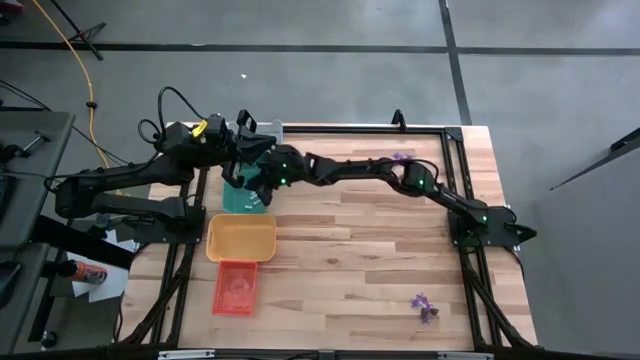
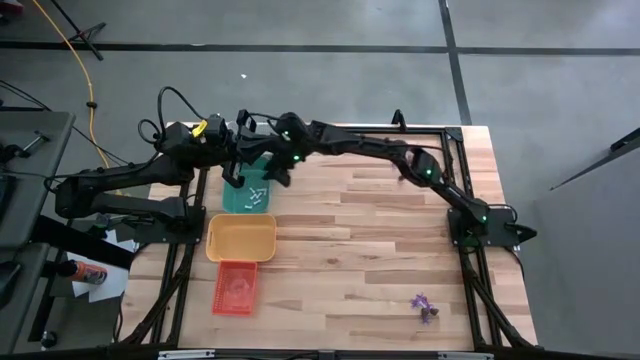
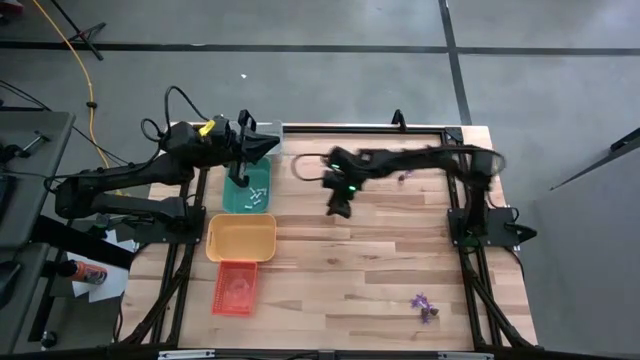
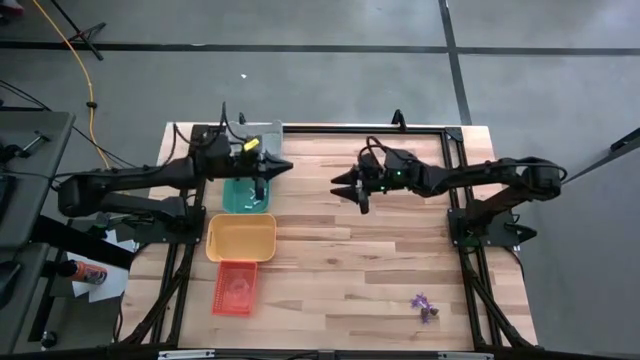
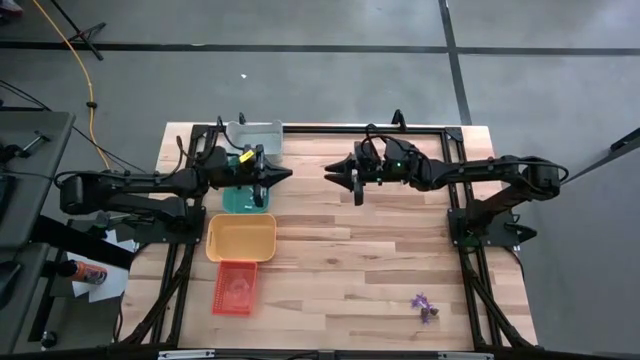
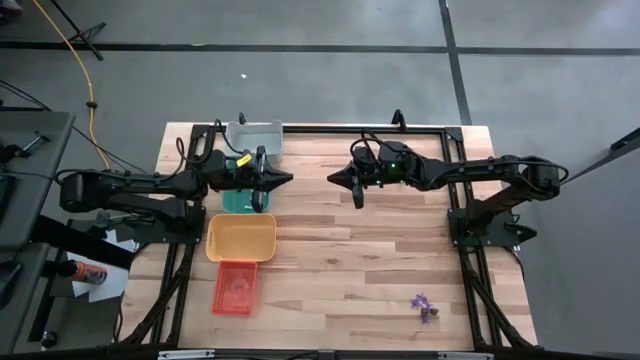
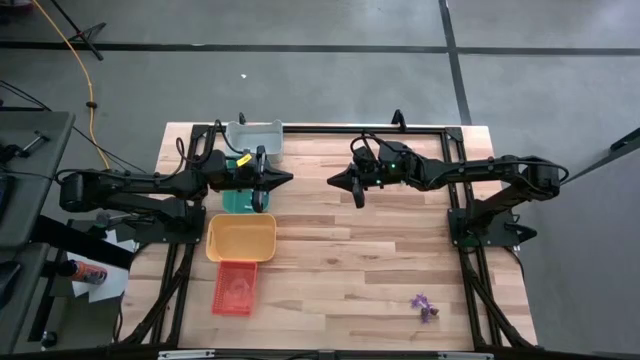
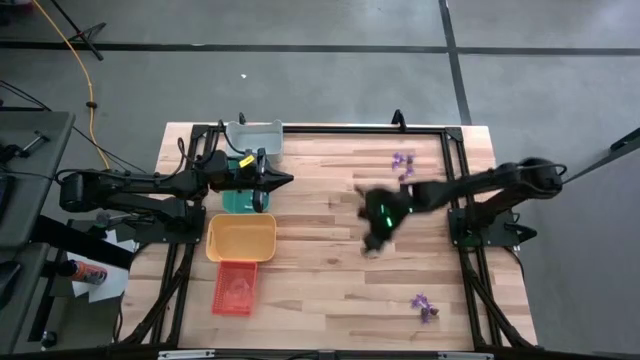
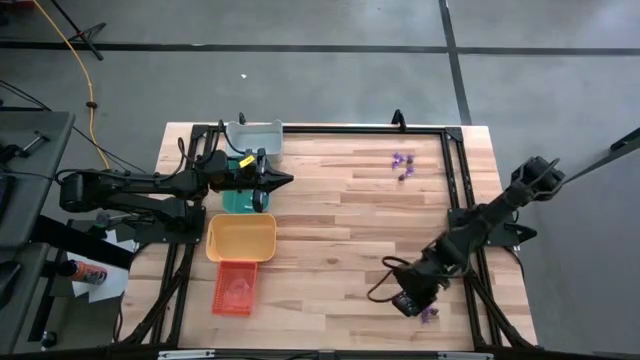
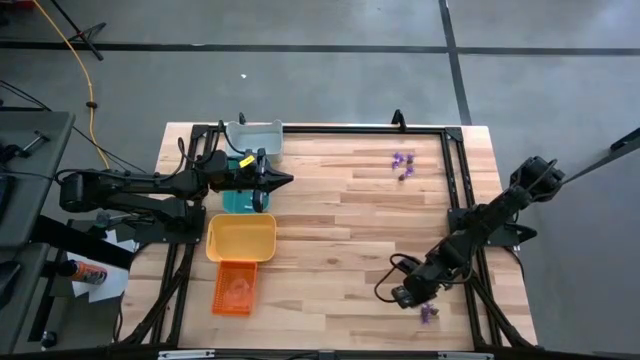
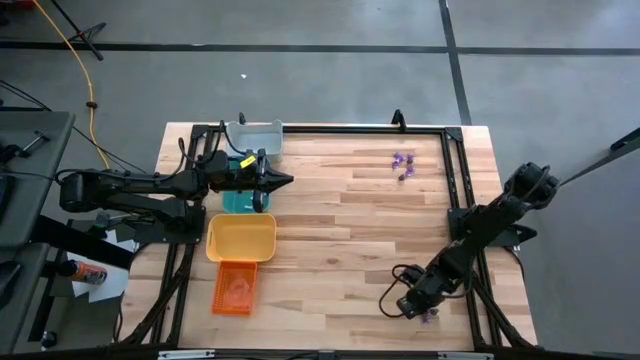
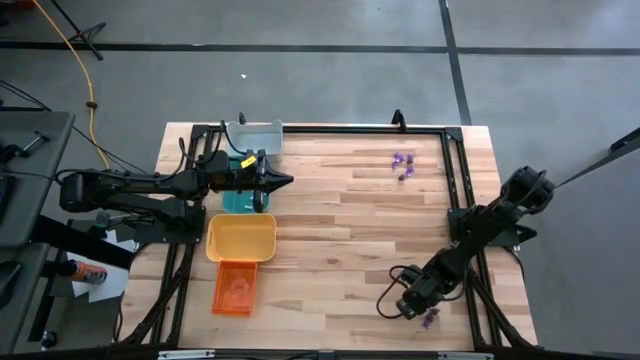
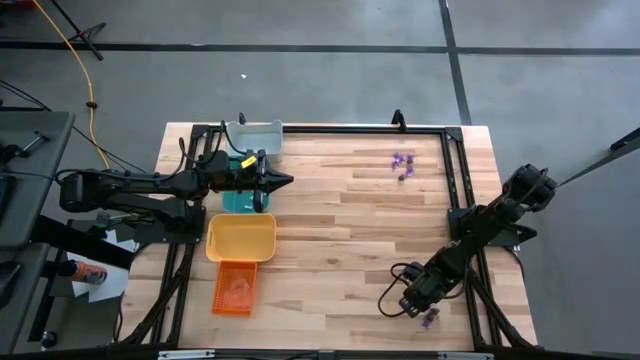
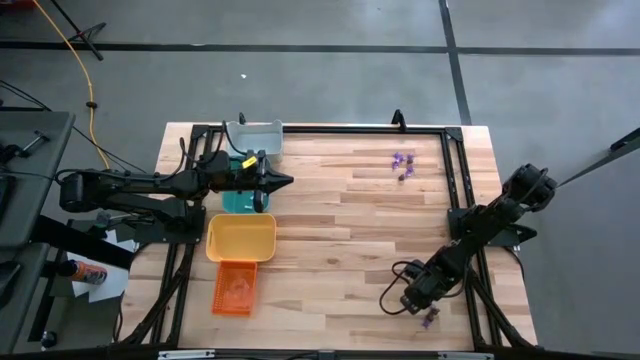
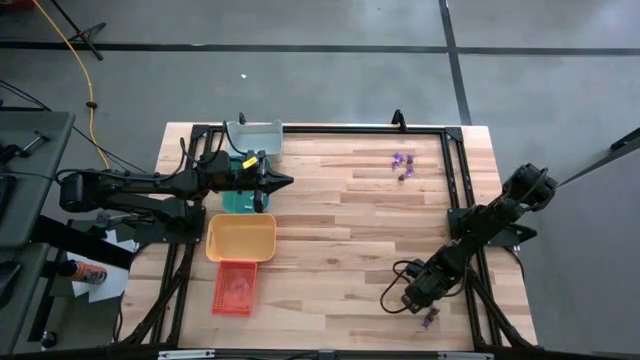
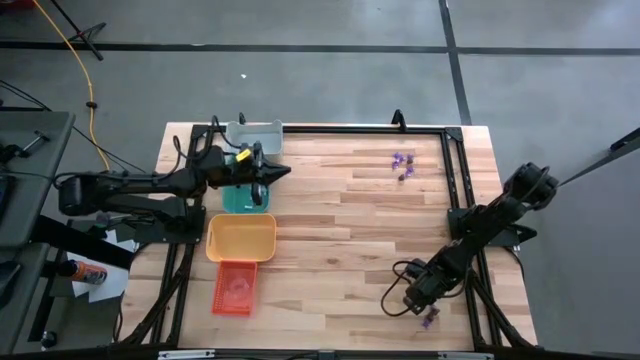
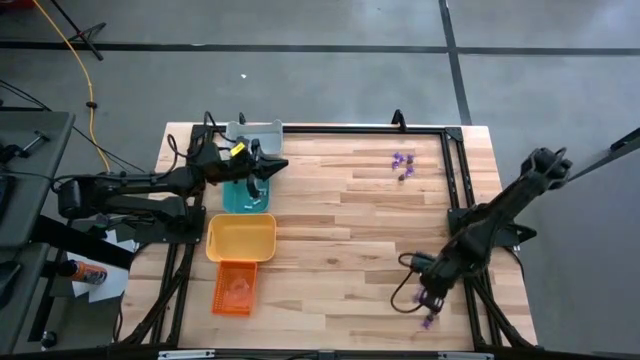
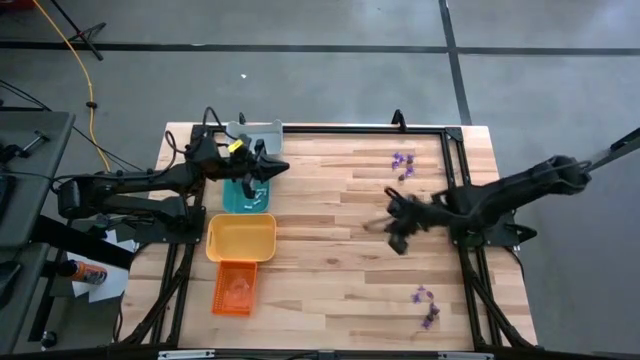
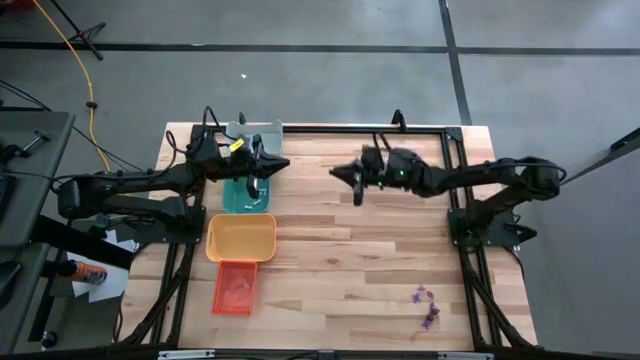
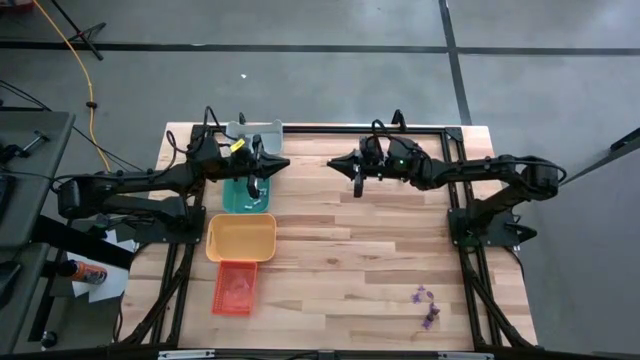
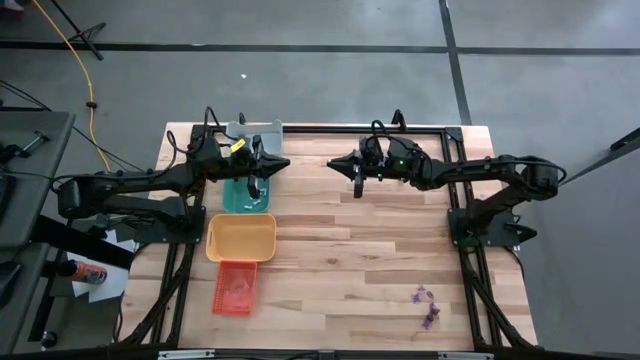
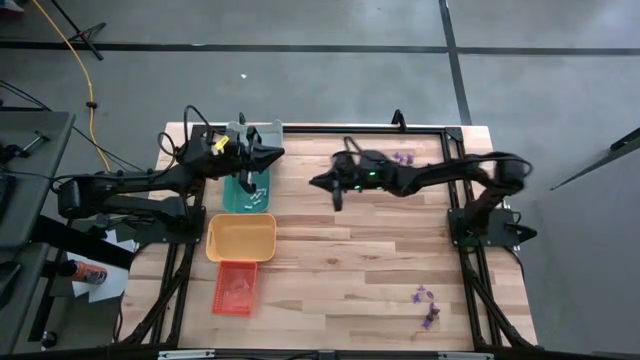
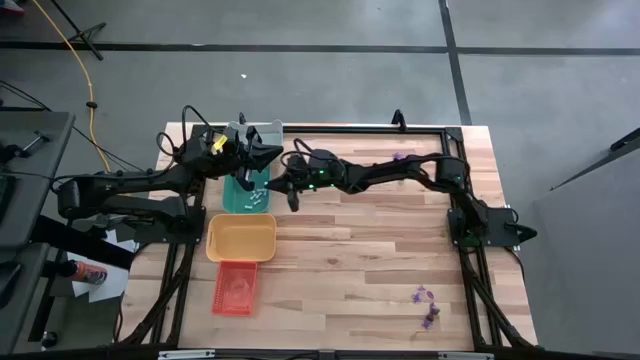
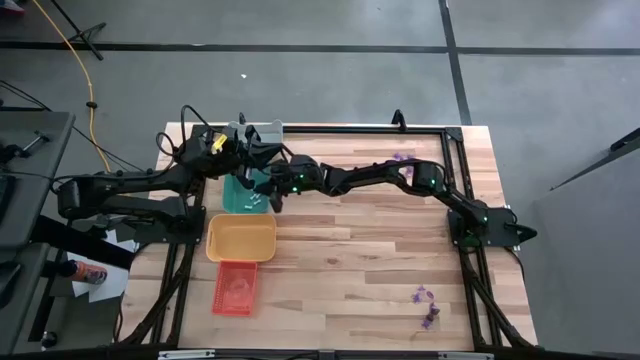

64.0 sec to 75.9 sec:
Task: Sort Halloween decoration
Put the white bone toy in the green bin

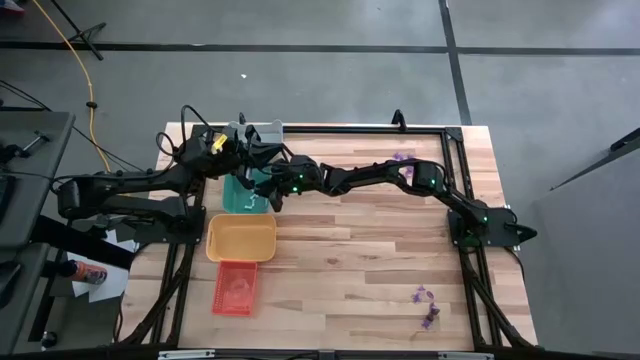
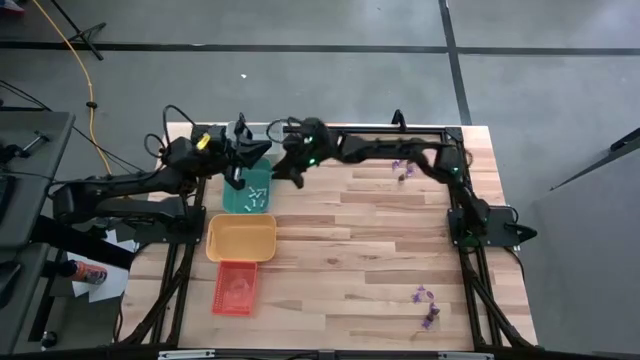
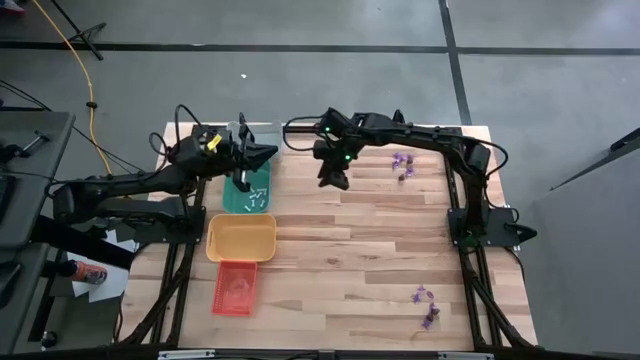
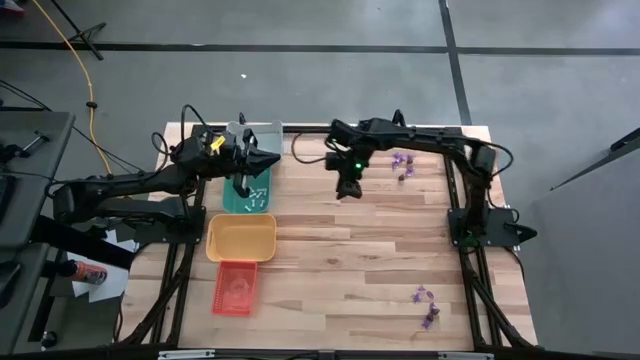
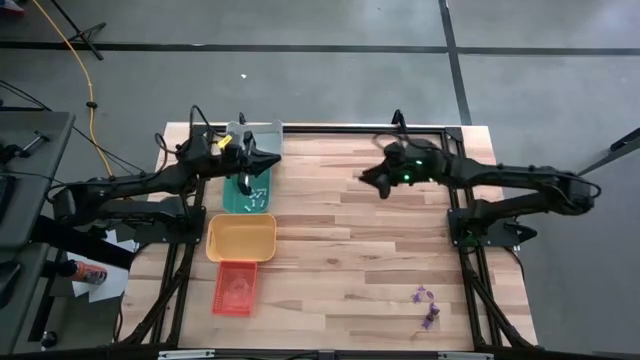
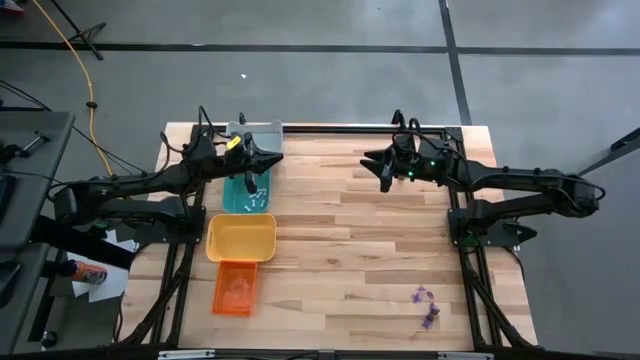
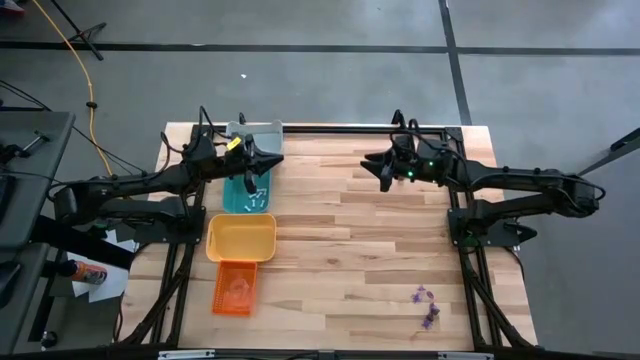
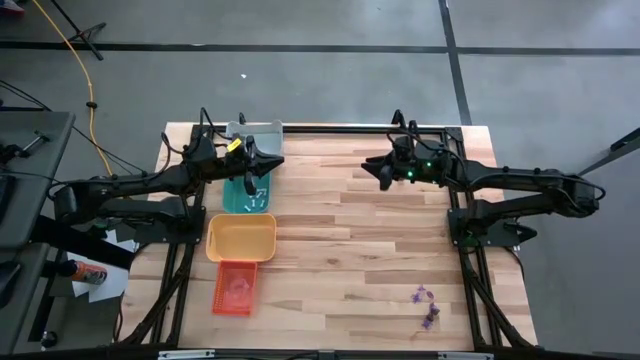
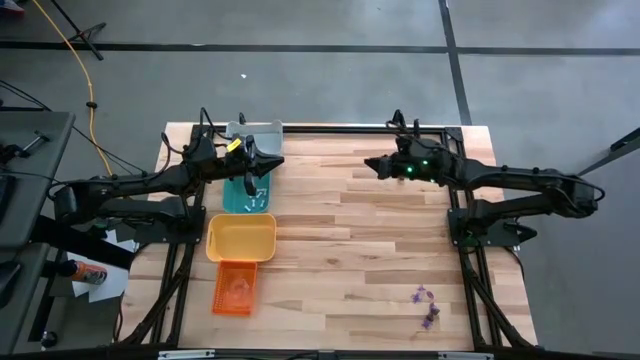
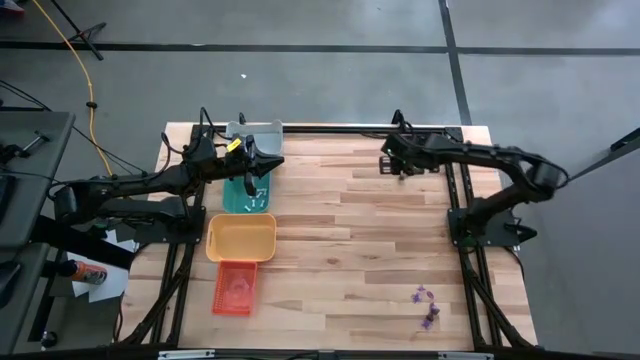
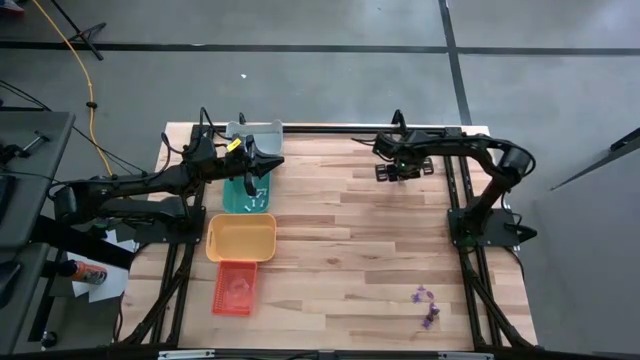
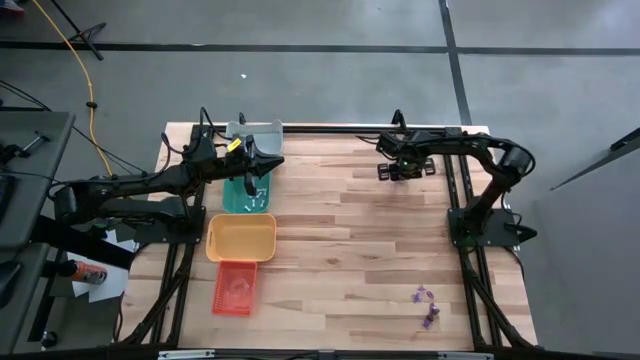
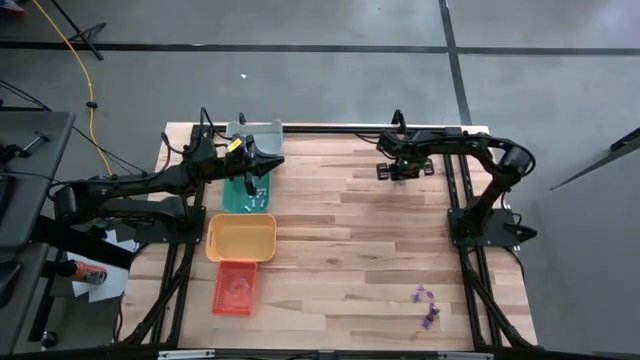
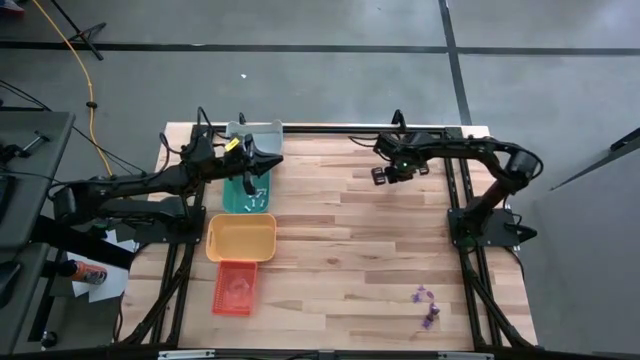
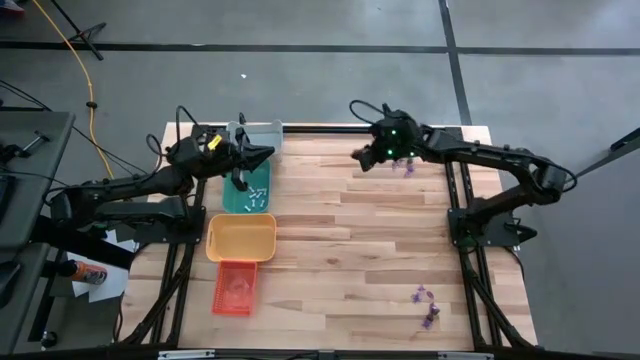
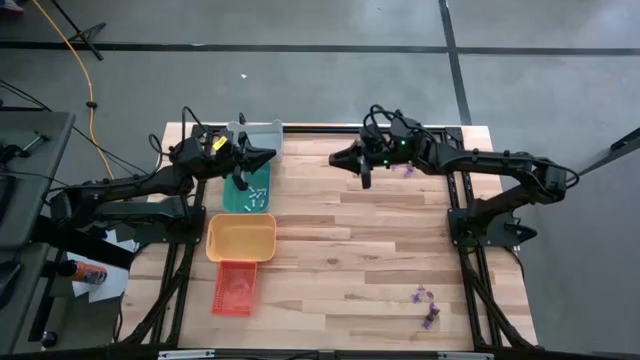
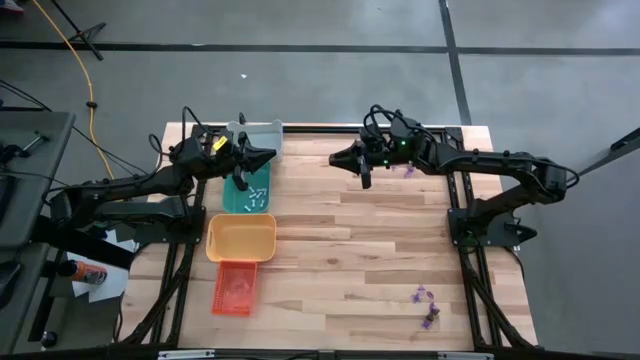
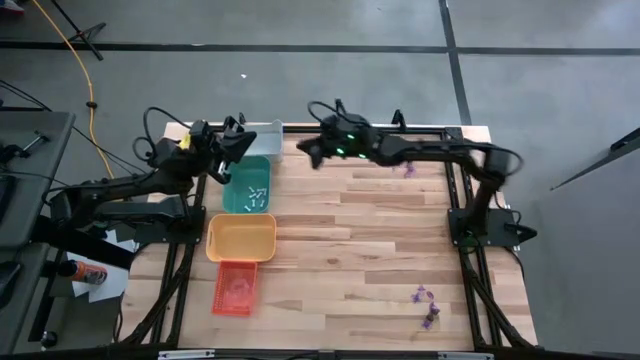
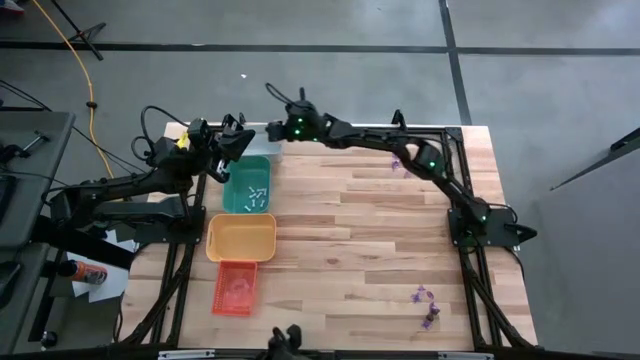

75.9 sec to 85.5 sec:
Put the black skull toy in the white bin
